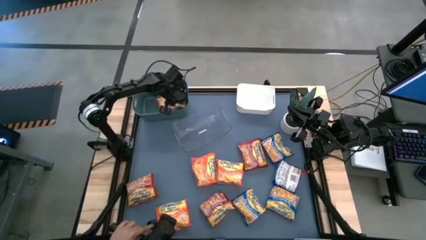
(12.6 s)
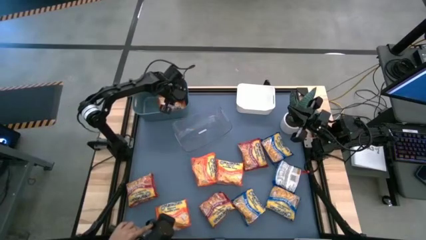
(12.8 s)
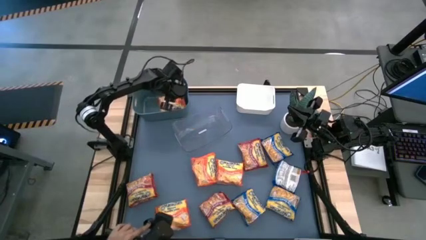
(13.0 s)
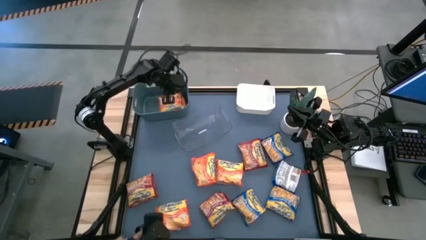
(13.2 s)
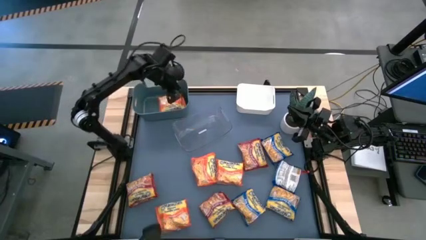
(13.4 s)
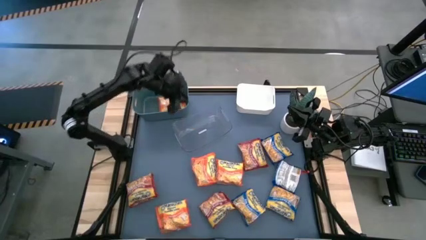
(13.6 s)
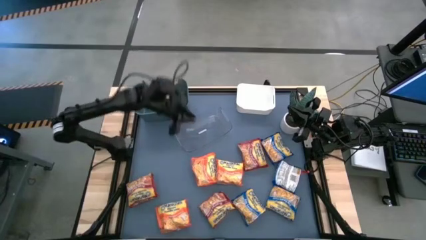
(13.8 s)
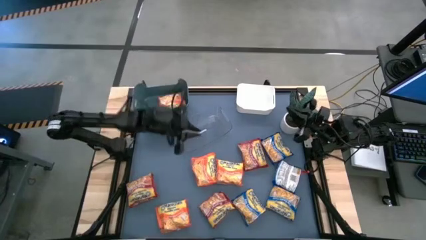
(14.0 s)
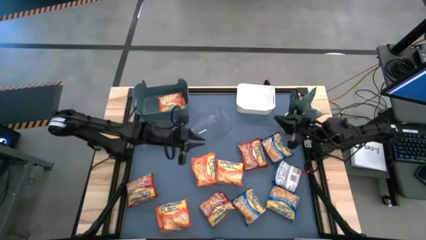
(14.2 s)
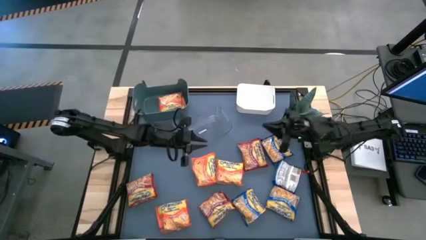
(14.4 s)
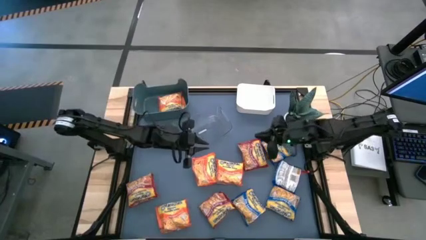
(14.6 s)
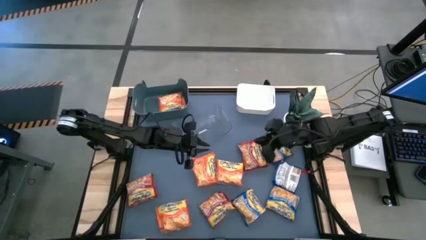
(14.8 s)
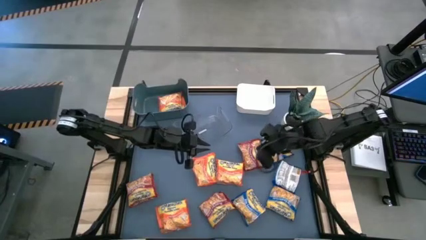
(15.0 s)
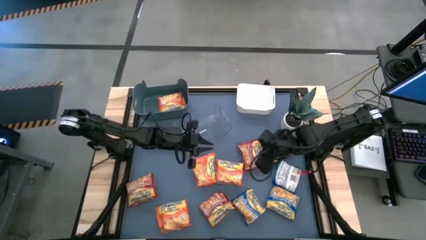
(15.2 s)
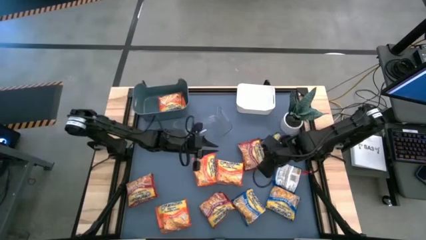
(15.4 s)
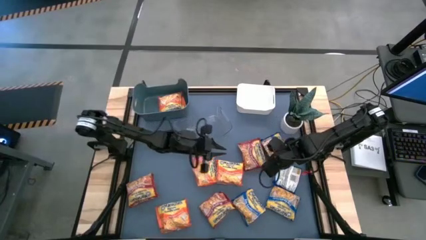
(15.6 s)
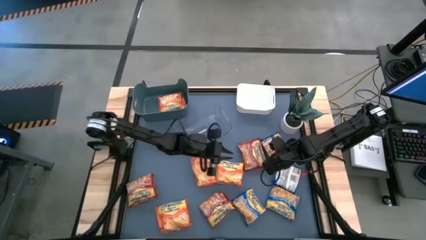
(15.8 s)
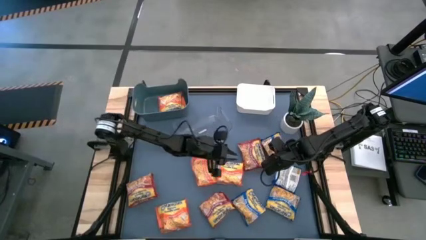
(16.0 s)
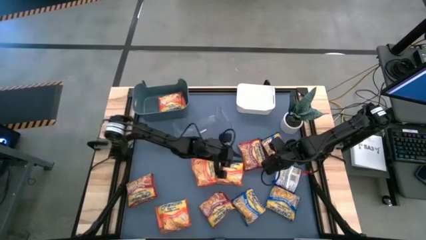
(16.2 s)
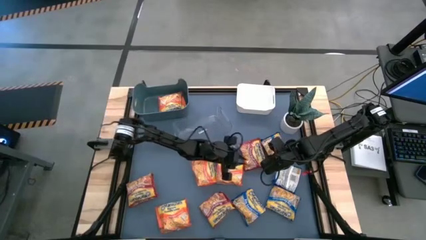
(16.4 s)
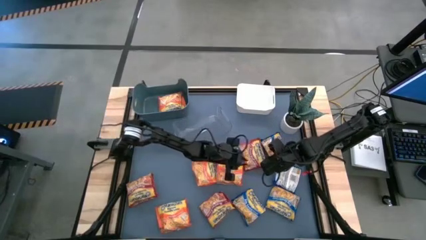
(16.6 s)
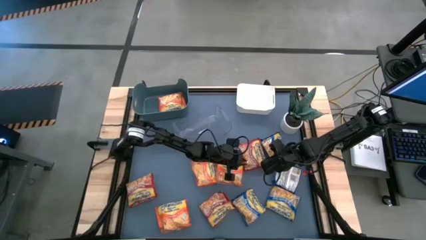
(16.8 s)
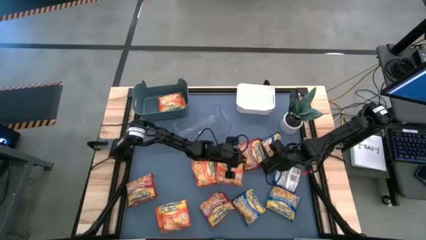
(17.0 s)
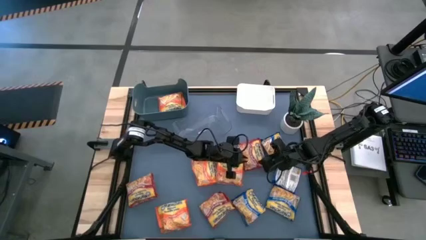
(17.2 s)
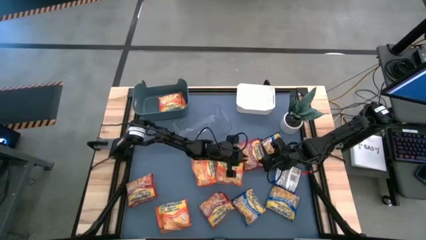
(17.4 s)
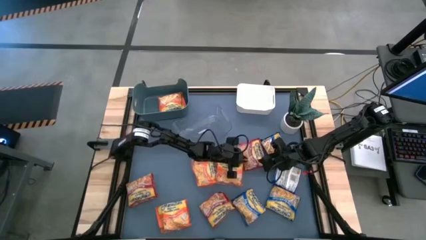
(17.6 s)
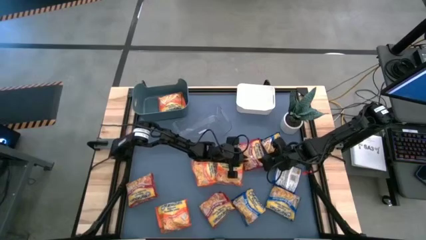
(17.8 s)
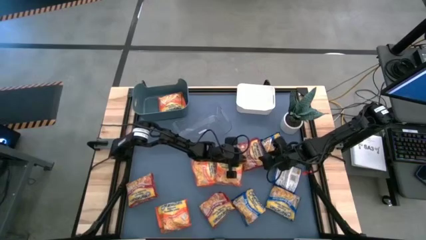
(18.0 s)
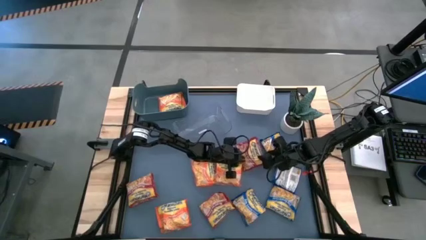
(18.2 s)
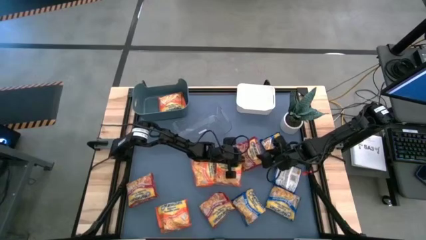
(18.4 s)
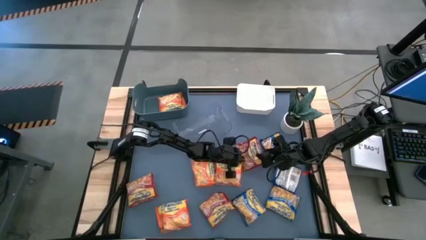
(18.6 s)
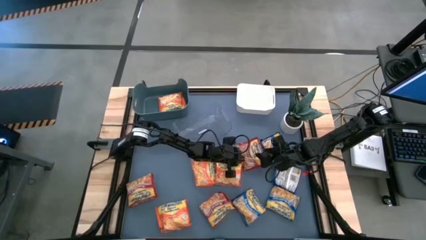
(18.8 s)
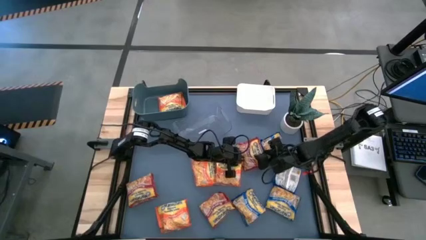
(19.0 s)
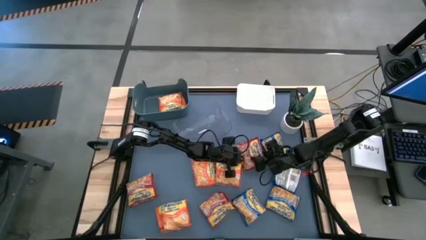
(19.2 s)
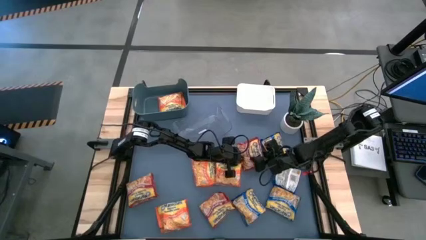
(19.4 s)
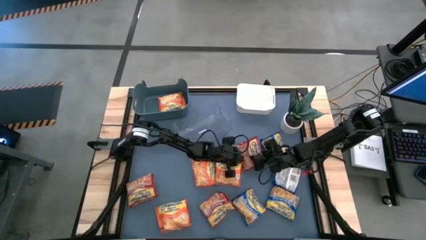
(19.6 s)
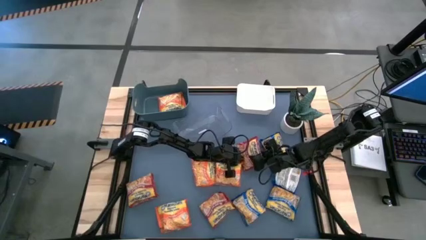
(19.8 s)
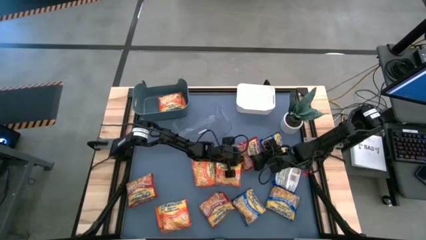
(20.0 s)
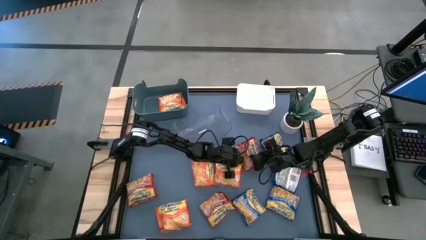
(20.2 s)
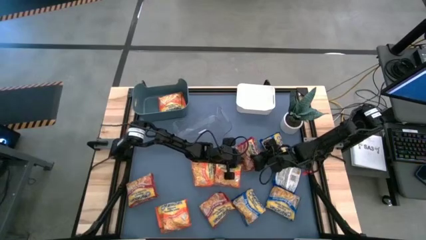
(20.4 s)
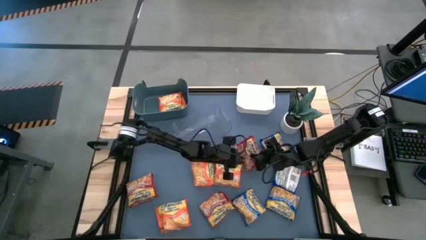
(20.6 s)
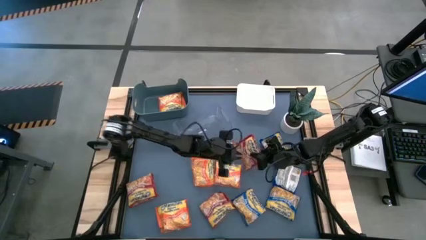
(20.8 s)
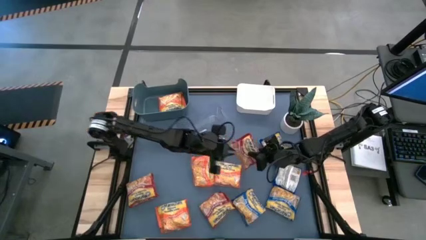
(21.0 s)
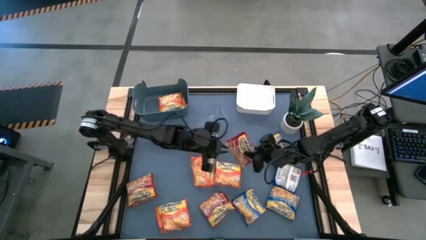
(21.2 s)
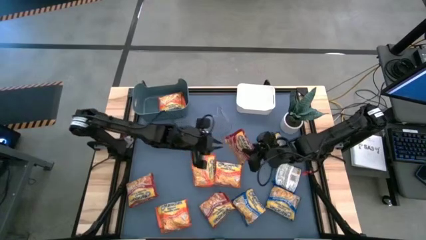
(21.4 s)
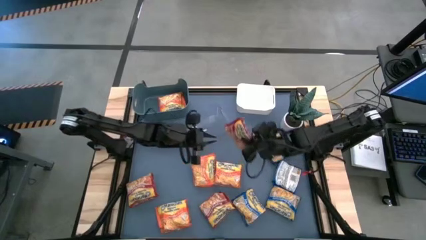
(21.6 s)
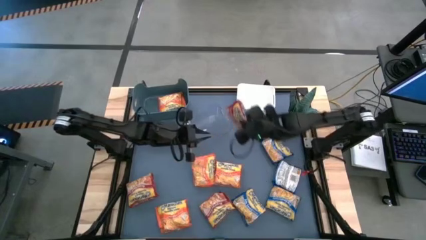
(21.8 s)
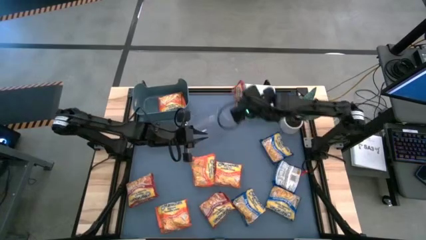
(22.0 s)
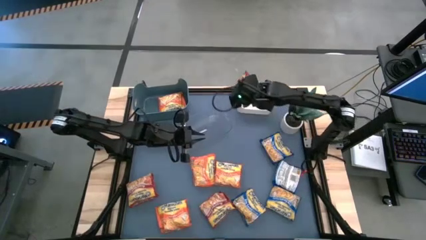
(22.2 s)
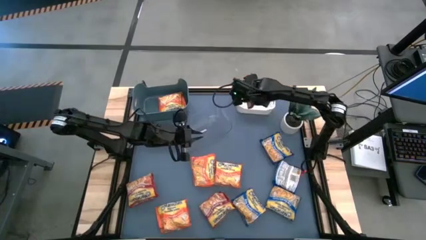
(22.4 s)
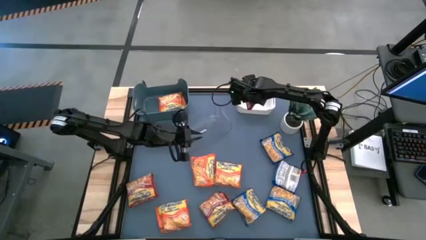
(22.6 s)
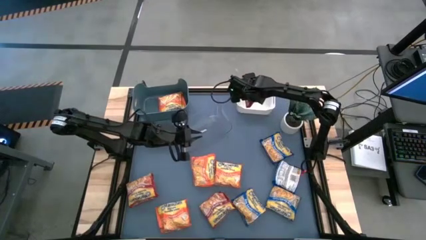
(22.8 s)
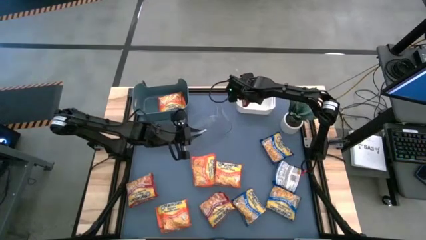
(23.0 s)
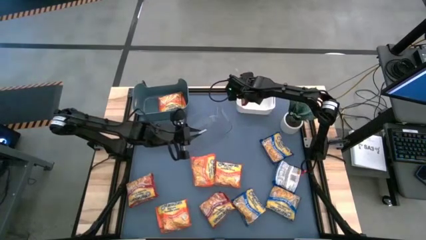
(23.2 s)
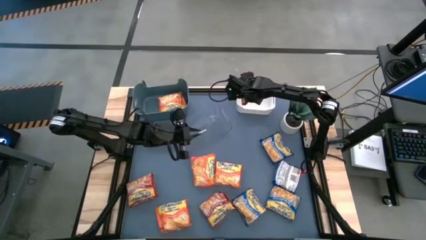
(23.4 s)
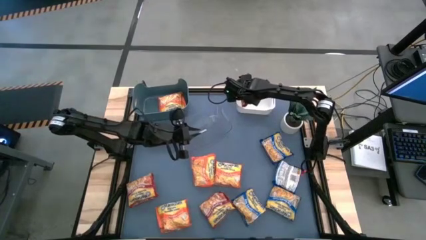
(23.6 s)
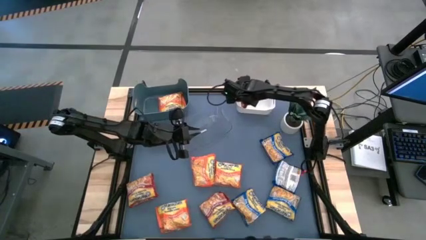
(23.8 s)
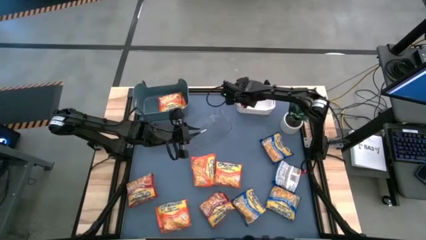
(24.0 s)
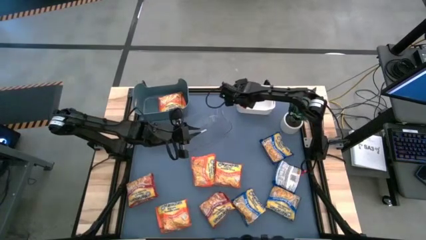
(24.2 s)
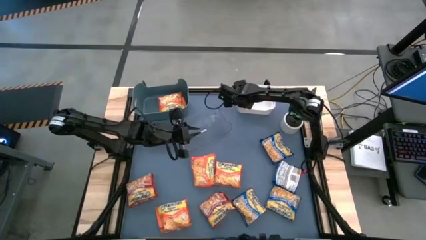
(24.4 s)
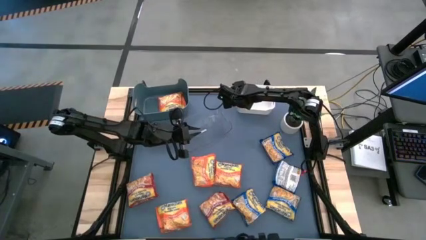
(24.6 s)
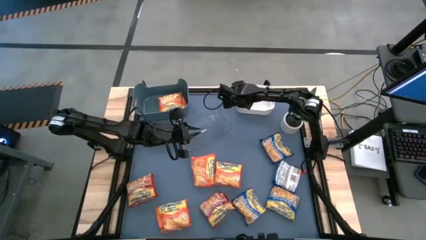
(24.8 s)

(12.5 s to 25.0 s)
Task: Sort Maruchan noodles
Put the red noodle pack into the white bin

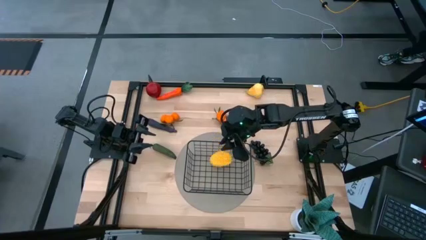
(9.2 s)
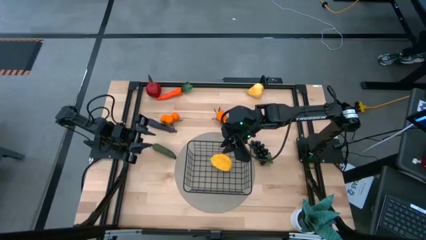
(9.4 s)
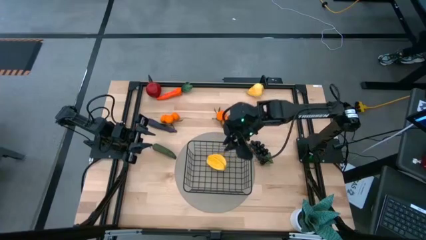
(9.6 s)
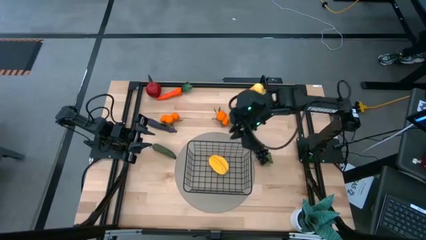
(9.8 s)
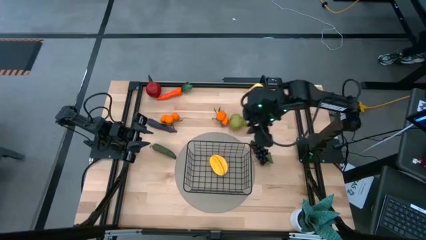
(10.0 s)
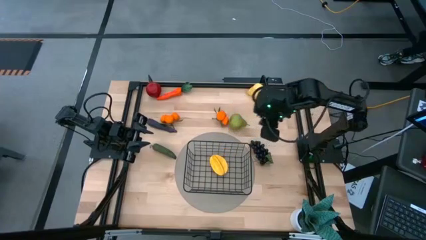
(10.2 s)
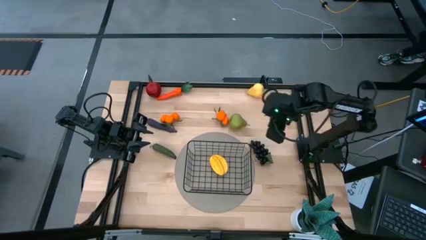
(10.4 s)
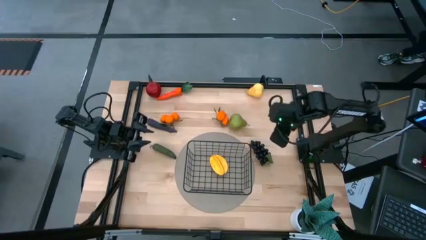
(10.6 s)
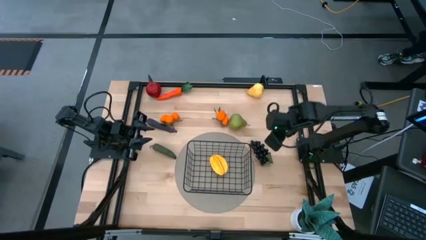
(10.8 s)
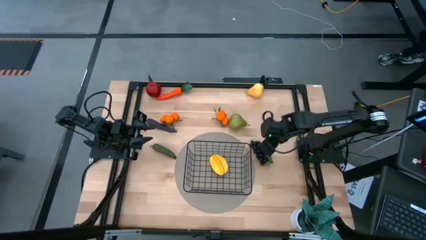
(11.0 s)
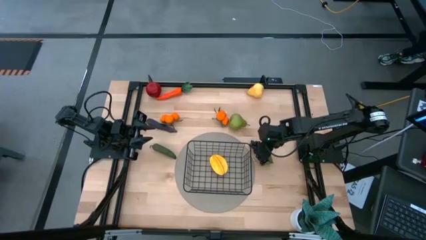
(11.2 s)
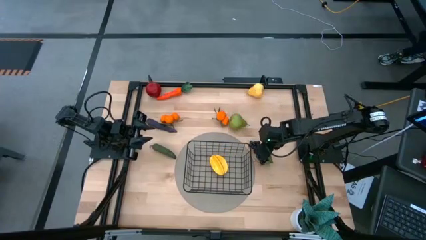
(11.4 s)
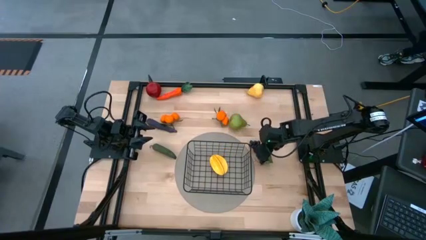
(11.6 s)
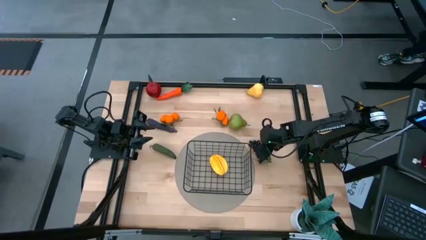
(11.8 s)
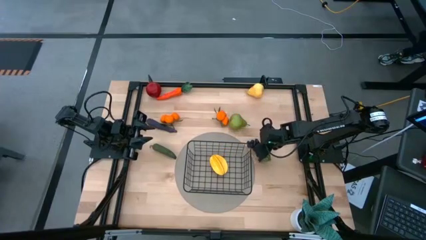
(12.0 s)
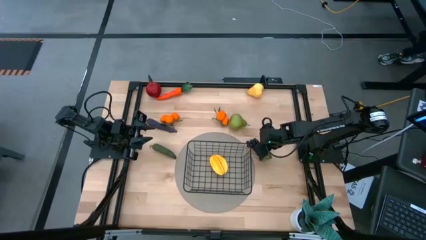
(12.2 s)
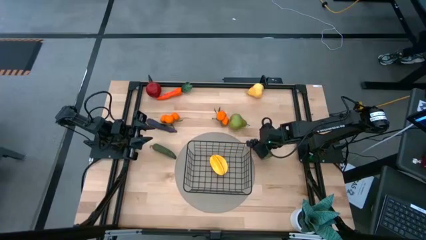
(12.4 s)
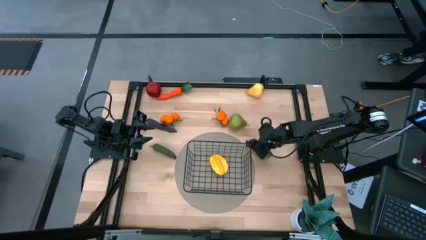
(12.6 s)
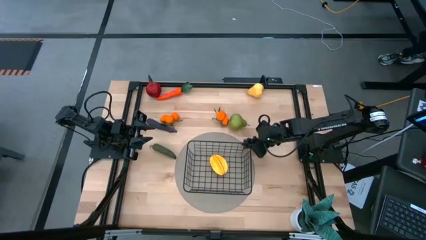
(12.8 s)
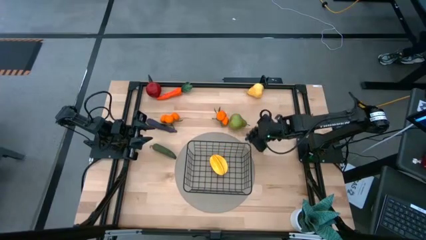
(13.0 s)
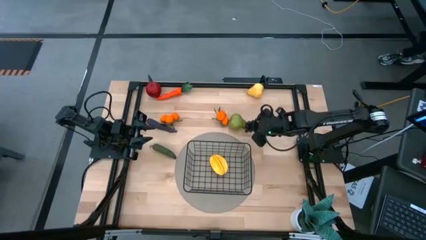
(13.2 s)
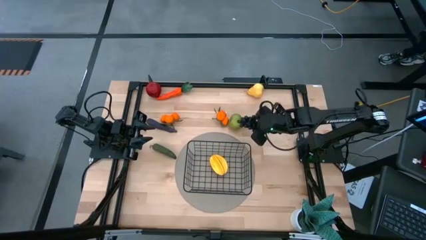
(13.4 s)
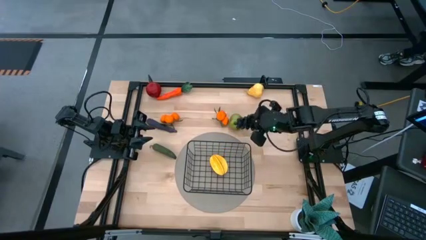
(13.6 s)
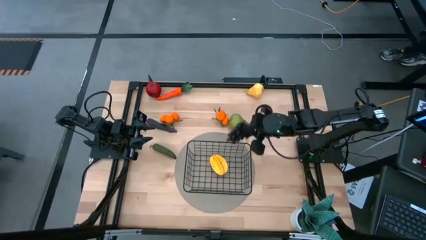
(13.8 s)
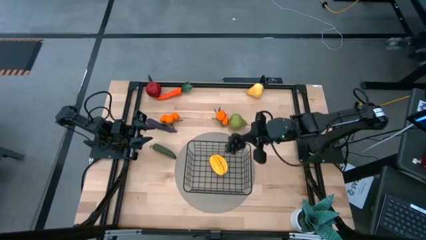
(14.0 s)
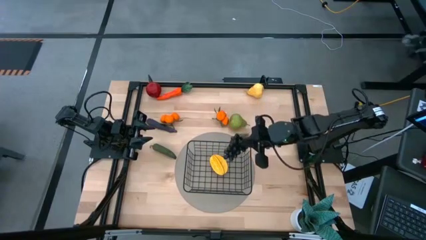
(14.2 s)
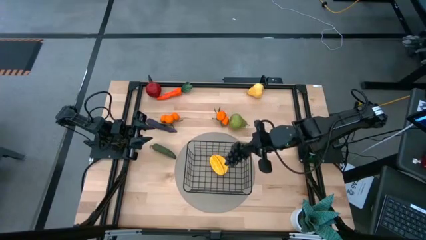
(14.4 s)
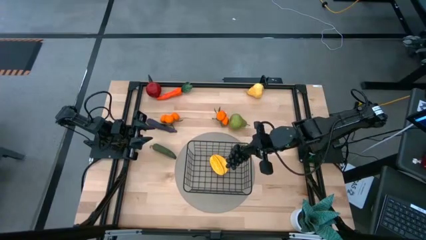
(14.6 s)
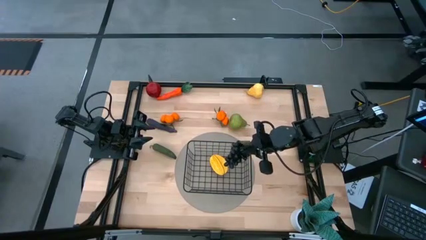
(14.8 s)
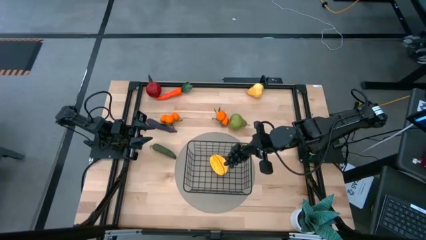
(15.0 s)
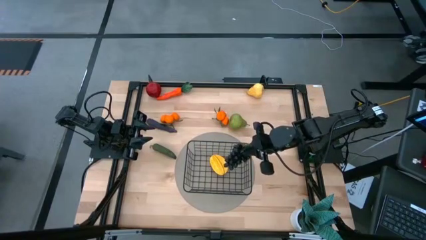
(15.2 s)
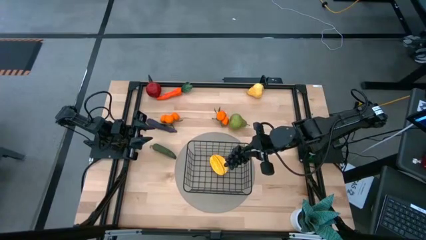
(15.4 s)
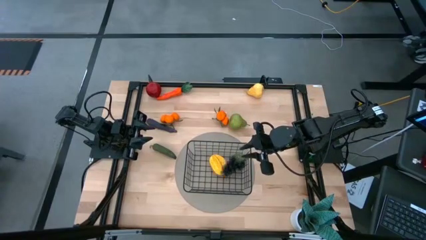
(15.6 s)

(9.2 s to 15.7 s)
Task: Build produce basket
Put the black grapes into the wire basket
